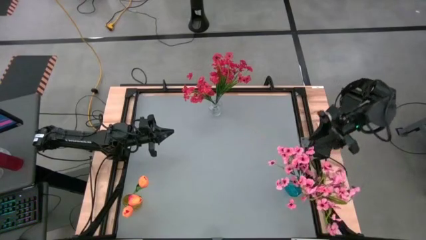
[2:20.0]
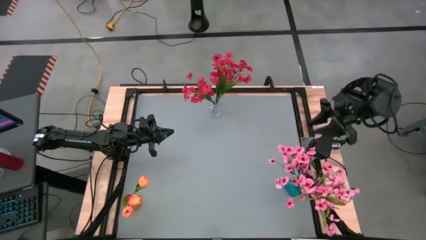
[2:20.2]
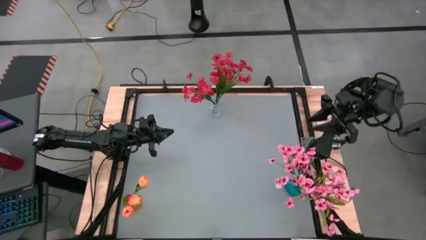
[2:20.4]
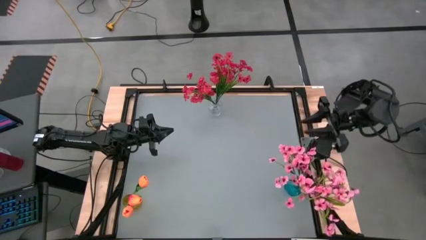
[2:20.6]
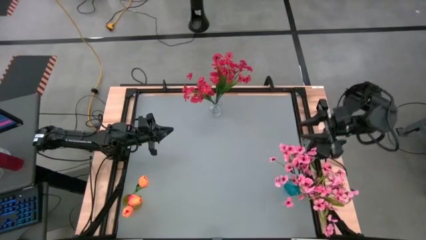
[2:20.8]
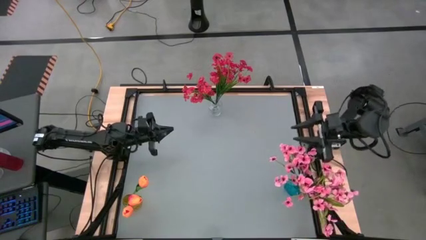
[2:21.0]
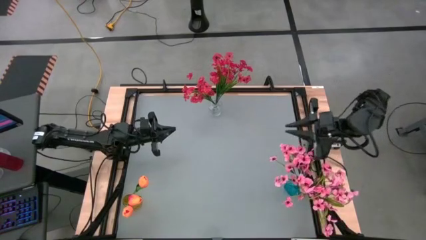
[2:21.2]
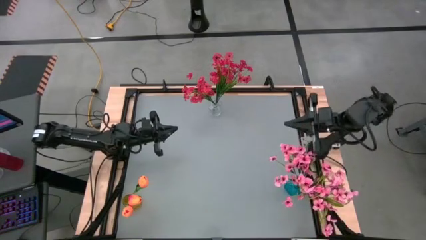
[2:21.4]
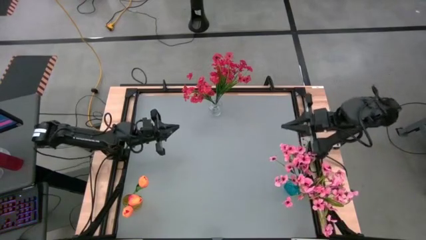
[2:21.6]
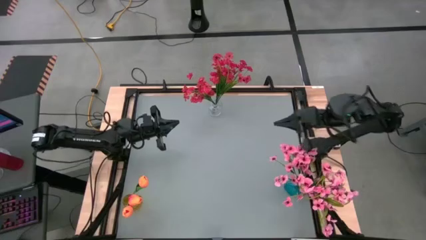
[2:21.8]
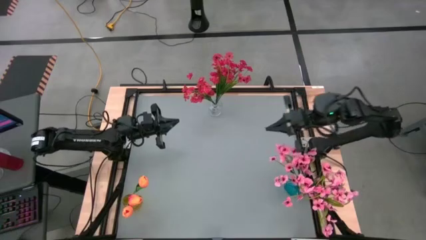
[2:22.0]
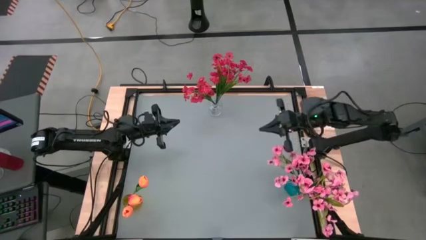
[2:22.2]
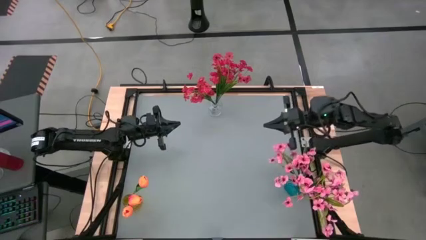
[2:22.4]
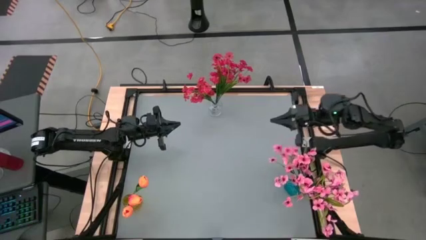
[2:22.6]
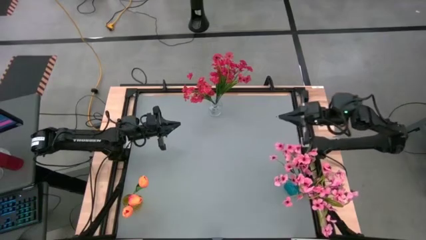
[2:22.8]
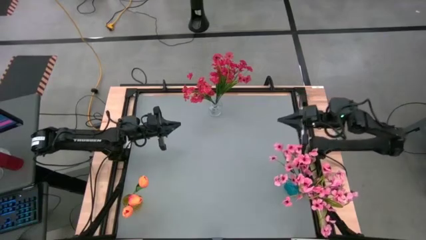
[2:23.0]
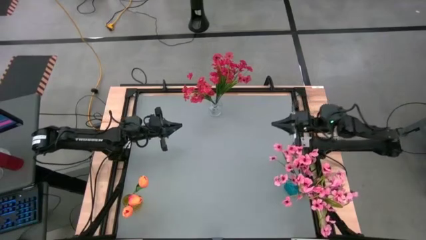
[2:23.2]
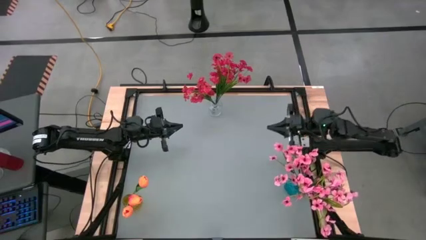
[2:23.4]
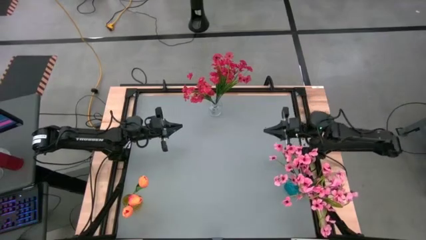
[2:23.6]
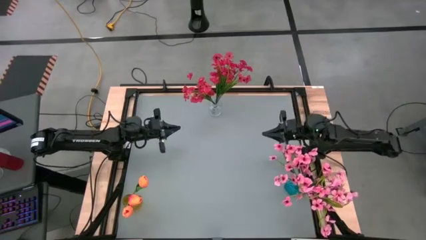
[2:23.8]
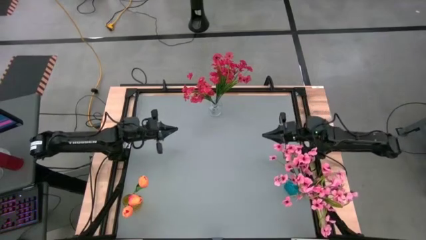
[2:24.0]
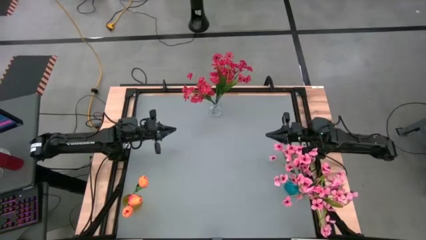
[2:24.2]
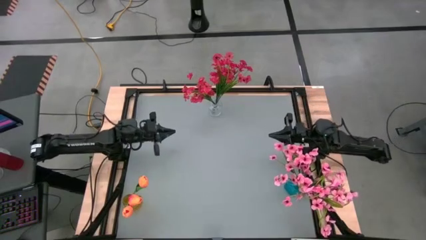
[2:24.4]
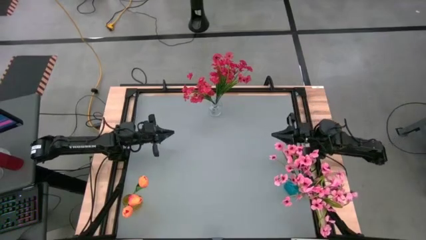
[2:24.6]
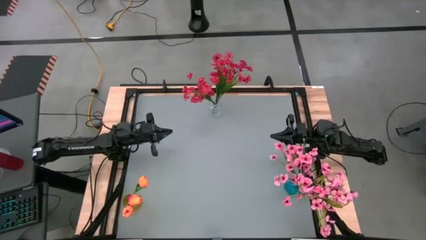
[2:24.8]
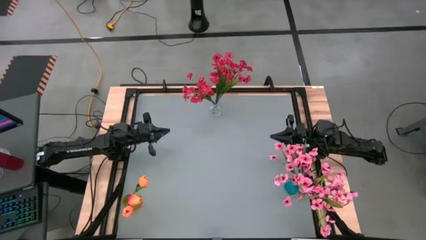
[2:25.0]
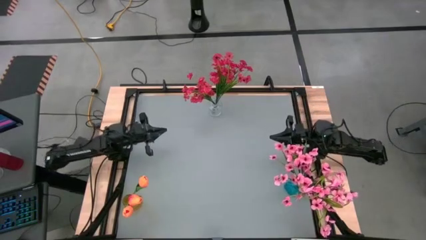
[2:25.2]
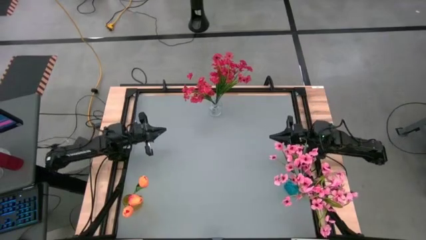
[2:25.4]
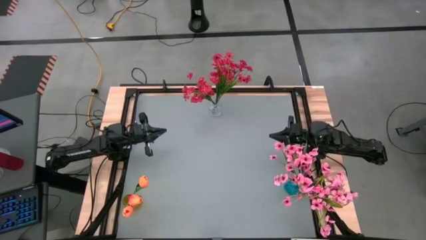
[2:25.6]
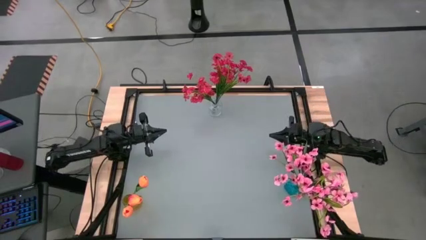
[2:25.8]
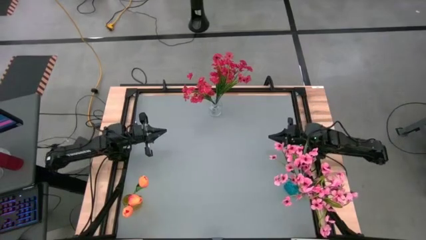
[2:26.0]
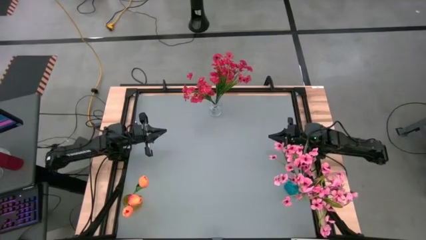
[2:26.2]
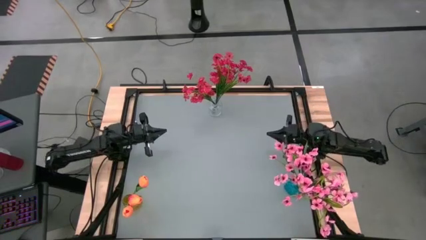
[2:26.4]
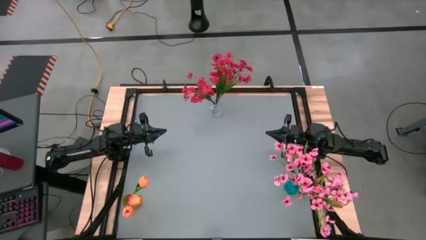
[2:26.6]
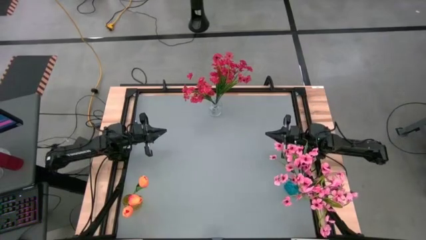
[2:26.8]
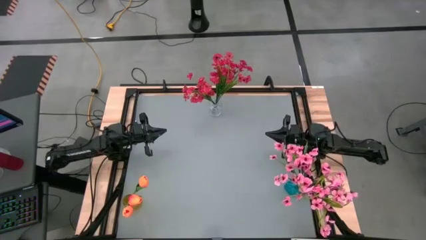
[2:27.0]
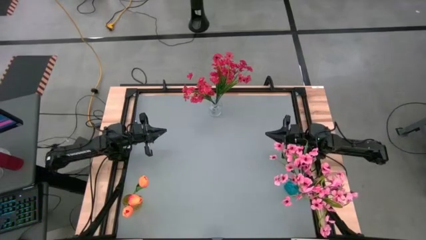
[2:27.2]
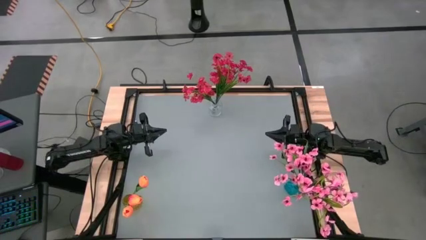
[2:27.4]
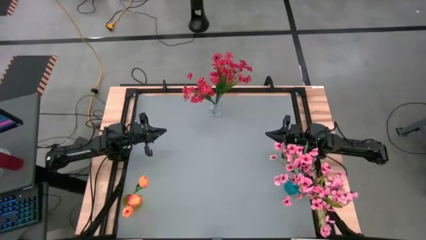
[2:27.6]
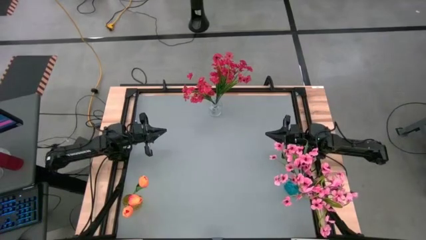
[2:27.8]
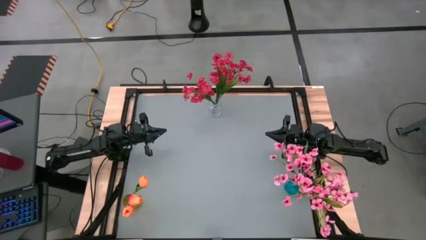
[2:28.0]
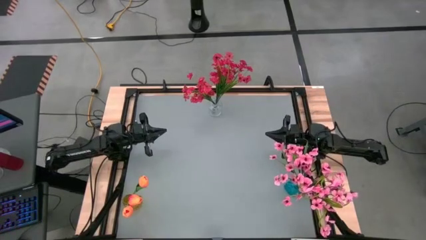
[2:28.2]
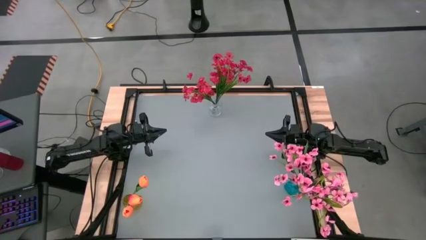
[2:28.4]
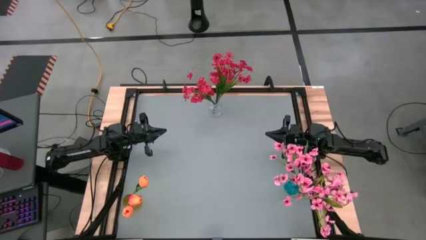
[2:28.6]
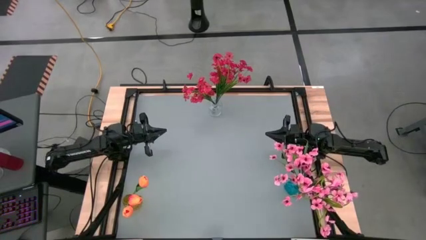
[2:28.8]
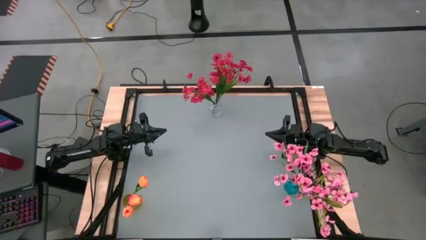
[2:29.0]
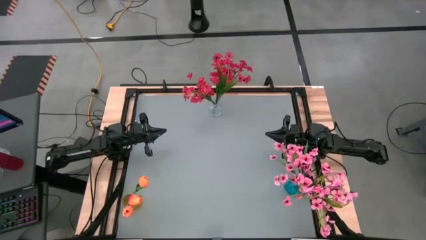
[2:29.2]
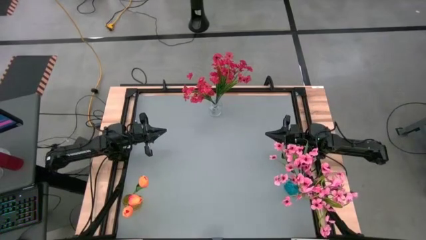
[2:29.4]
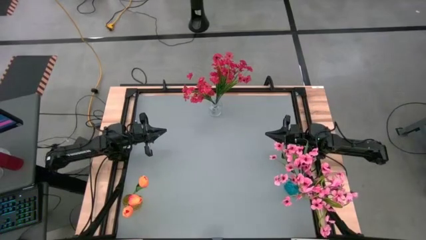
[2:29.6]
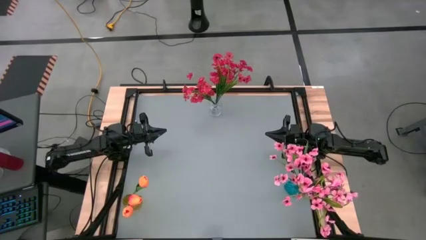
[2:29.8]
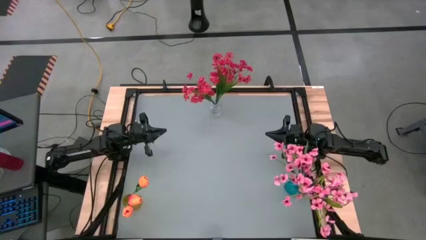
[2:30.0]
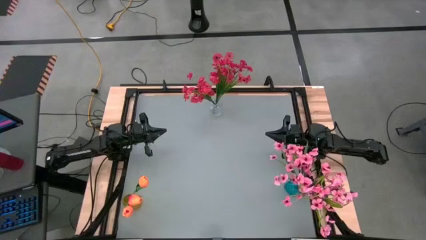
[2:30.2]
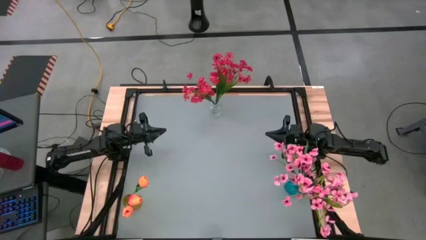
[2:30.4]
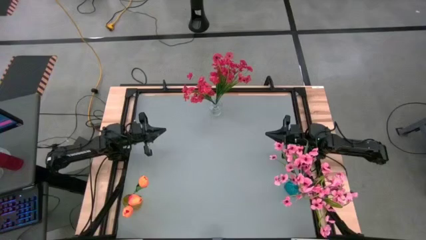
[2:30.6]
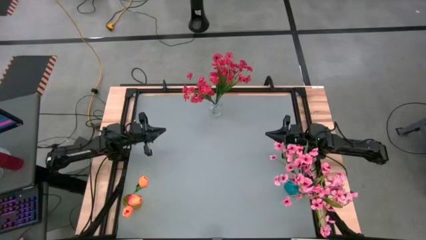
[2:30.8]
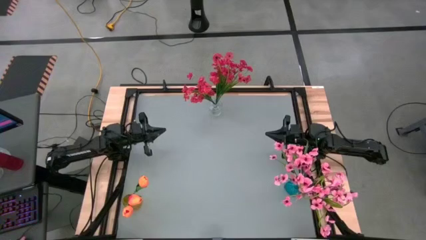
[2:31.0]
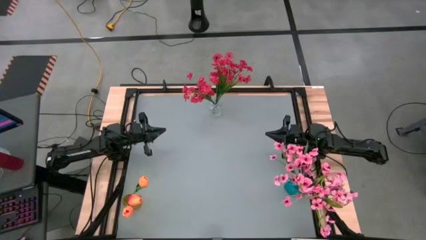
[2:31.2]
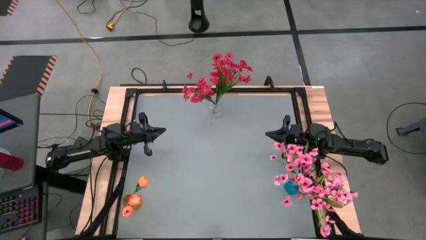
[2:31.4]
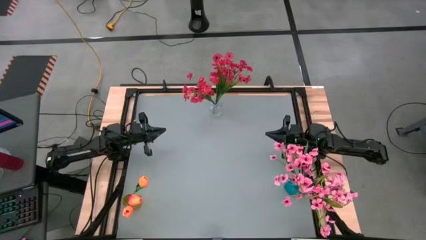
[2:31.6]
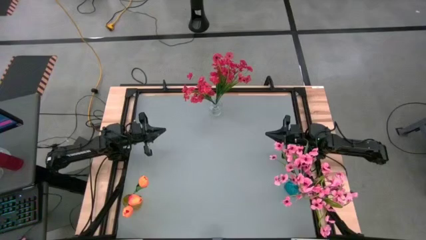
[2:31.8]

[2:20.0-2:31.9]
Task: Sort flowers into vase by color
Return to Home Position

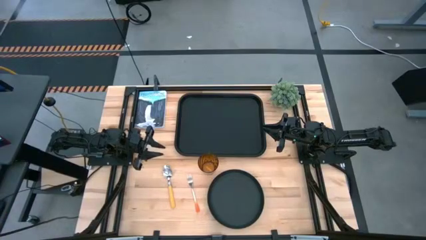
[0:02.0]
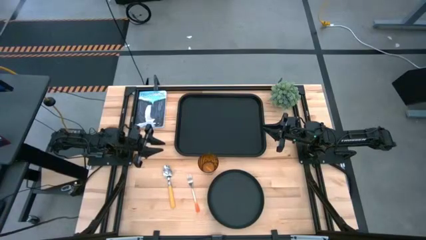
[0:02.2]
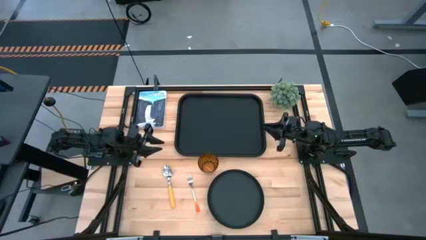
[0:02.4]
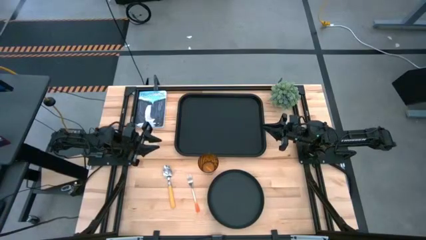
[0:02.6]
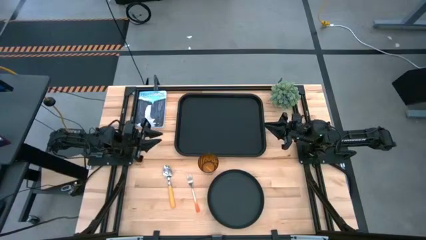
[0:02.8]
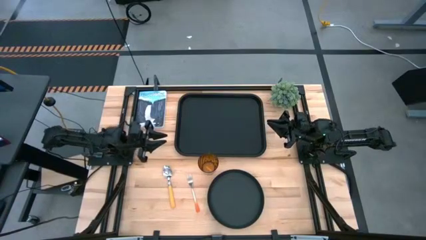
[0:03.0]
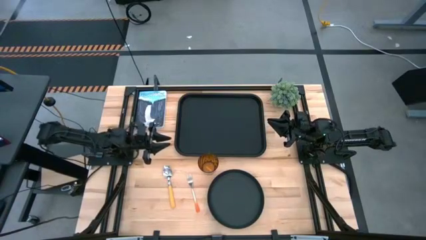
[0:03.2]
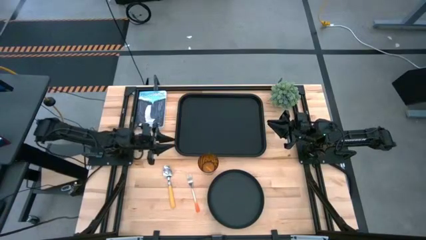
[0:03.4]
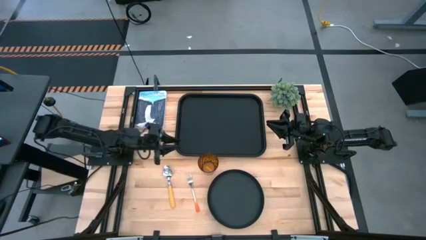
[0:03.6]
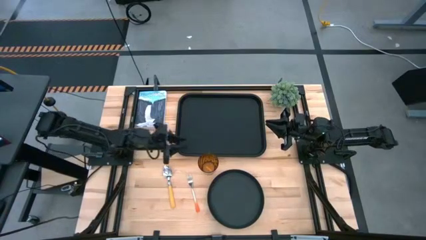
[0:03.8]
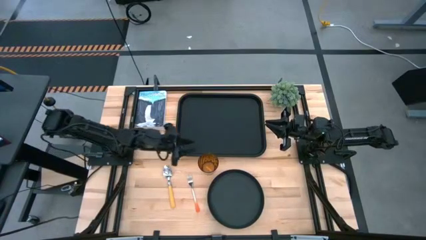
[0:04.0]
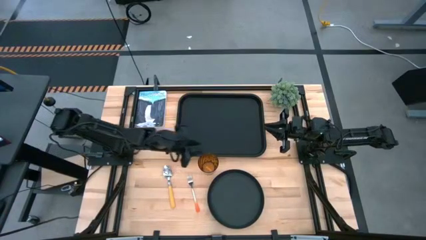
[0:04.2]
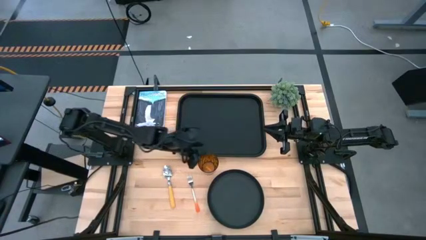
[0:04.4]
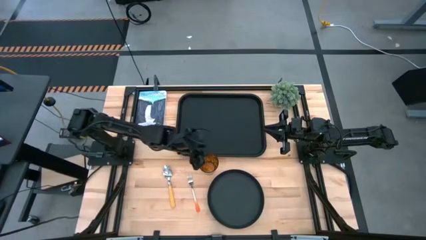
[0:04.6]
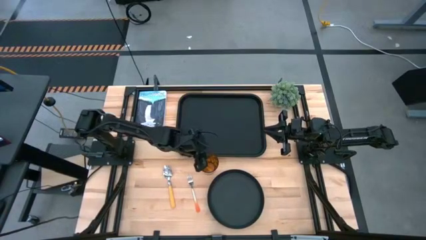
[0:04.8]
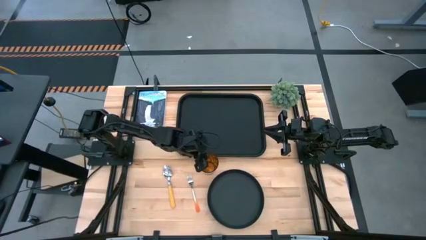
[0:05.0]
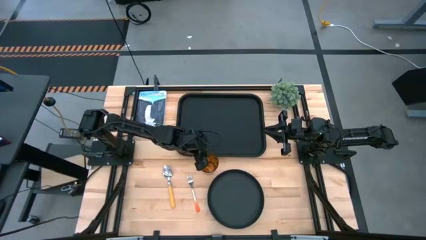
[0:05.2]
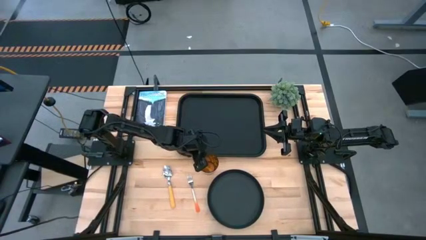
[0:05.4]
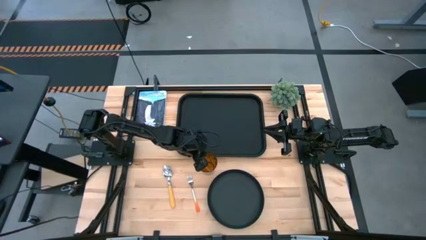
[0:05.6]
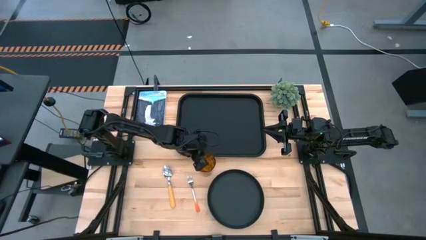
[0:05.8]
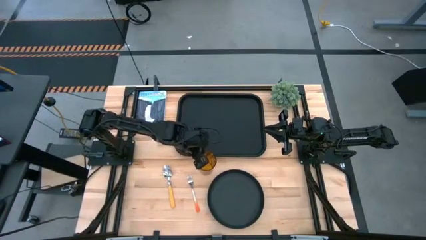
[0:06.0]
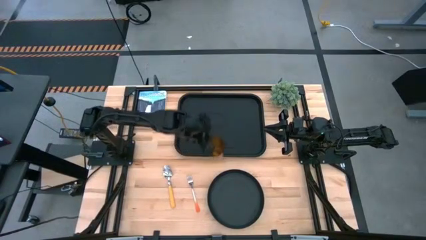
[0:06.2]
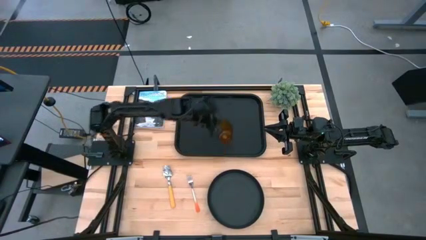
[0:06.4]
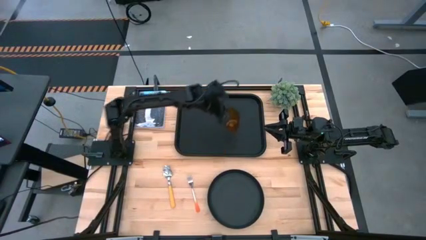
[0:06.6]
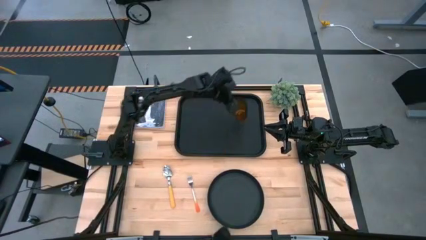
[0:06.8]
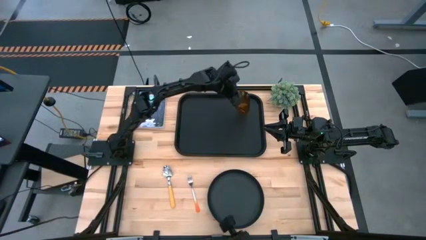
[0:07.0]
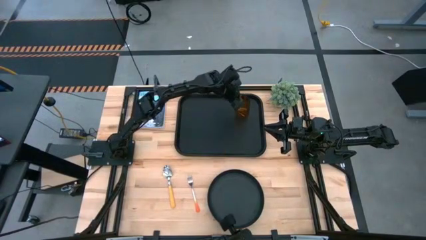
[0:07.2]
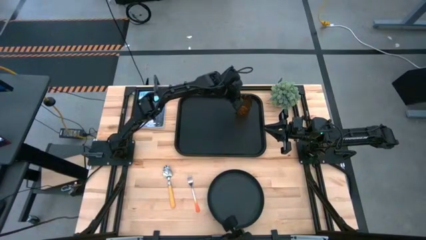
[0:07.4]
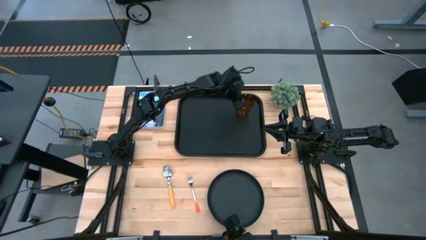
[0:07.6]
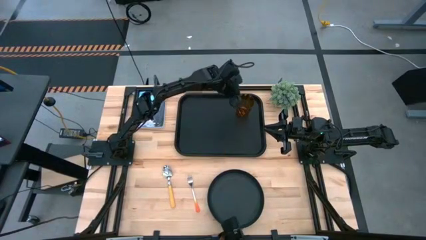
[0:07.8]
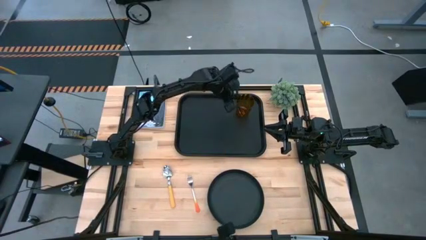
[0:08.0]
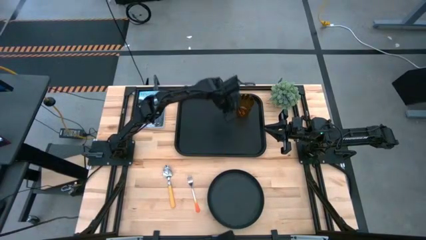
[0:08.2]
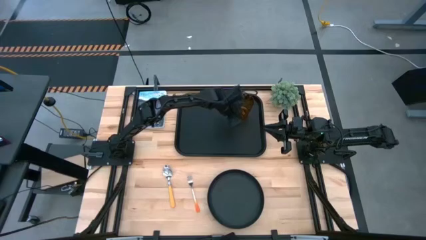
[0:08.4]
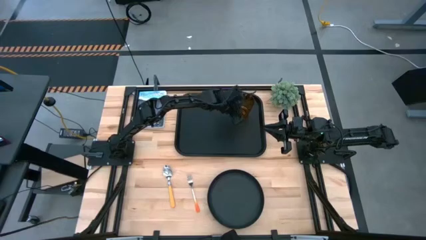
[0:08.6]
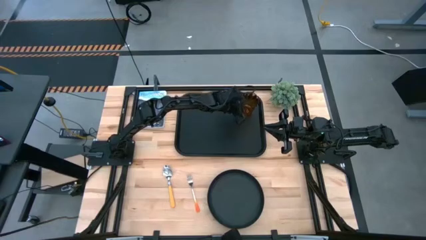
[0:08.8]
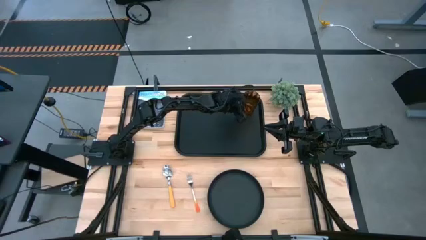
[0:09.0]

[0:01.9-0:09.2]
Task: Pick and place plate/cup/fork/spoon on tray
Put the orange cup on the black serving tray
